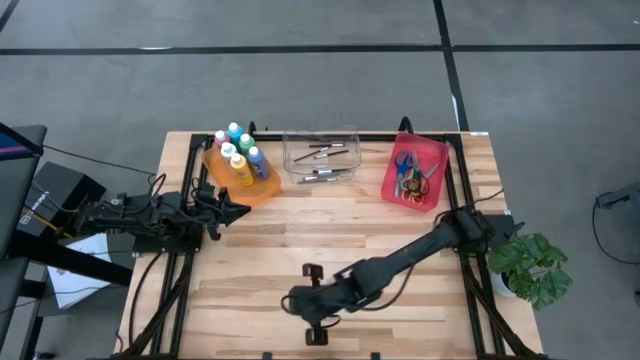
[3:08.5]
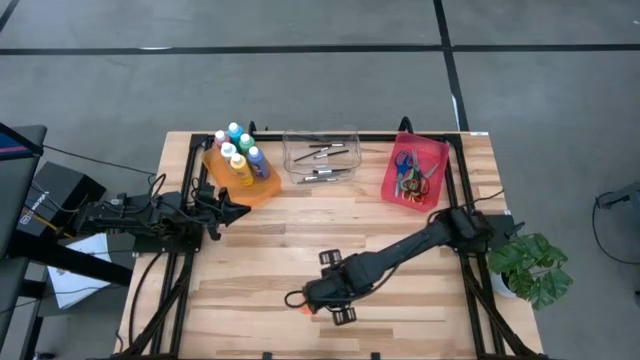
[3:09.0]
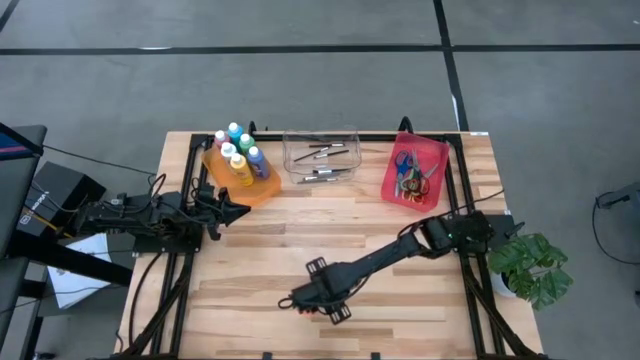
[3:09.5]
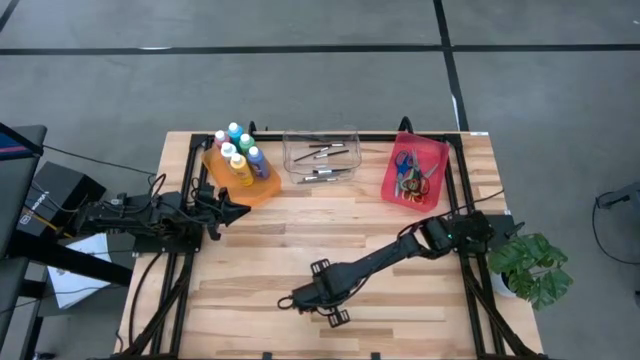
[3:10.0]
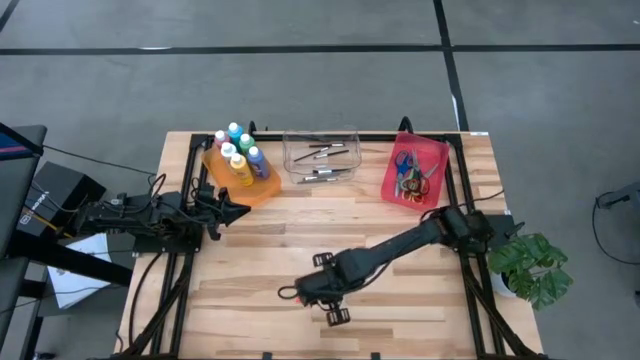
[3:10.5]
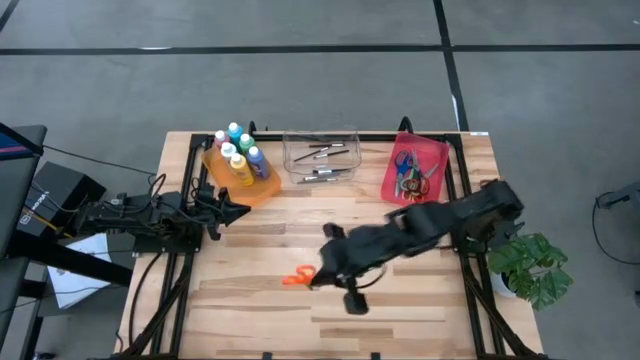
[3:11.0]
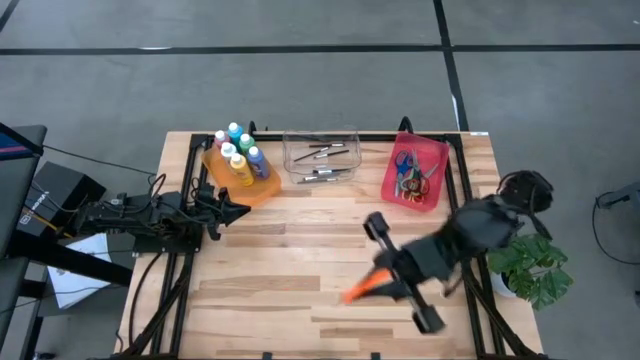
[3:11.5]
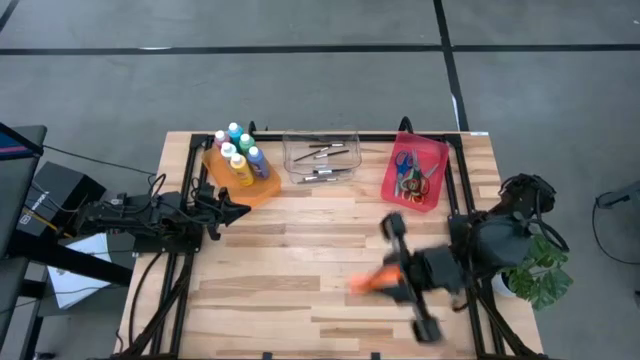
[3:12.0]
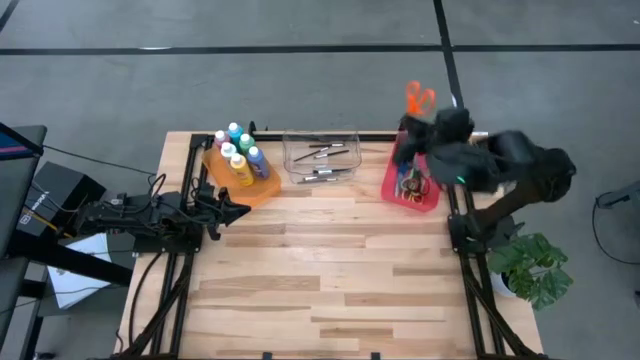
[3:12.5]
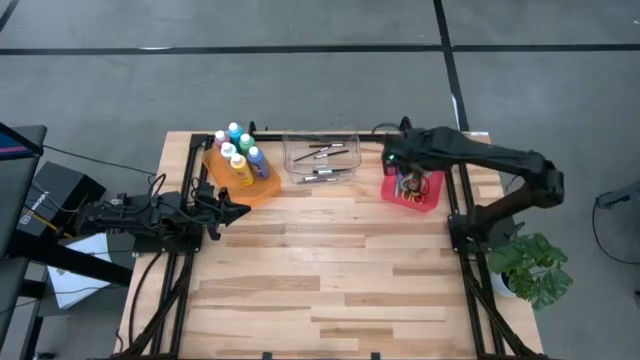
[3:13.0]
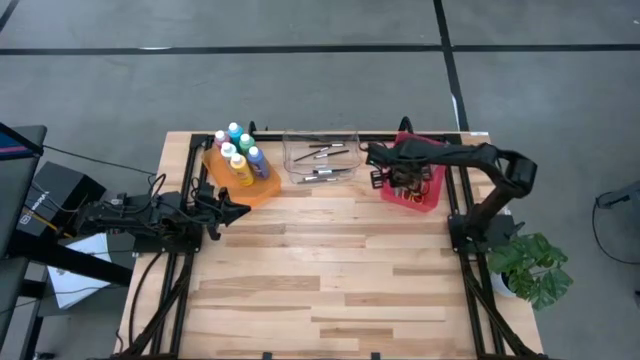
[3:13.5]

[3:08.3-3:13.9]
Task: Pick & Place Paint Supplies
Put the orange scissor into the red bin

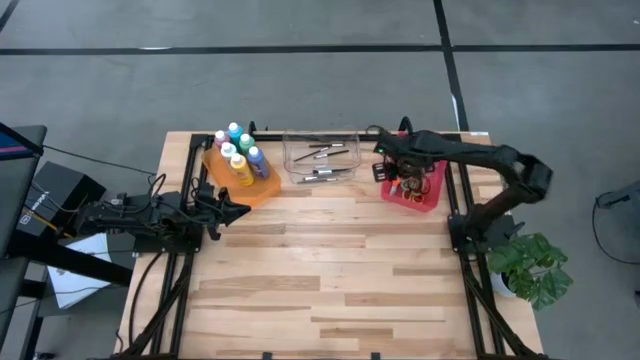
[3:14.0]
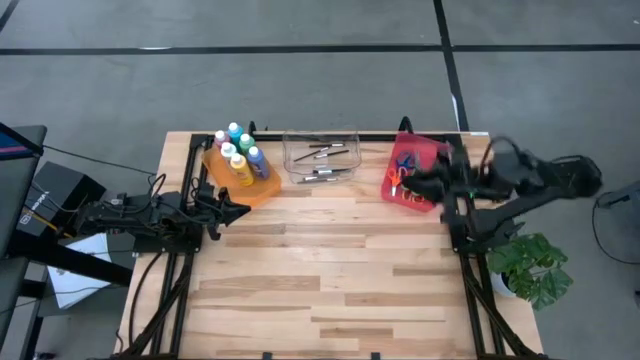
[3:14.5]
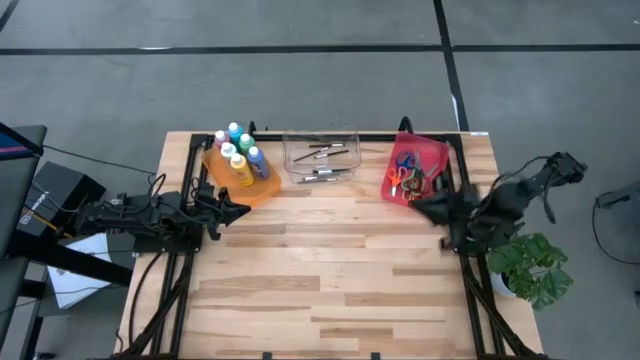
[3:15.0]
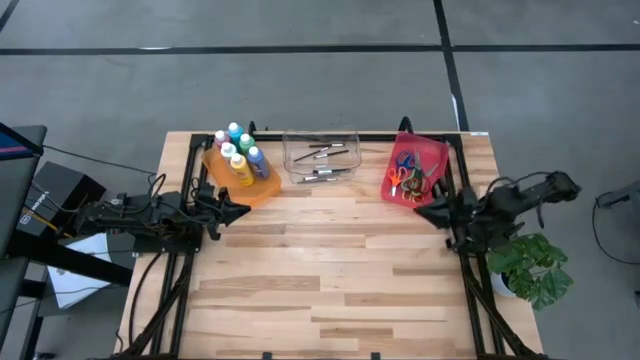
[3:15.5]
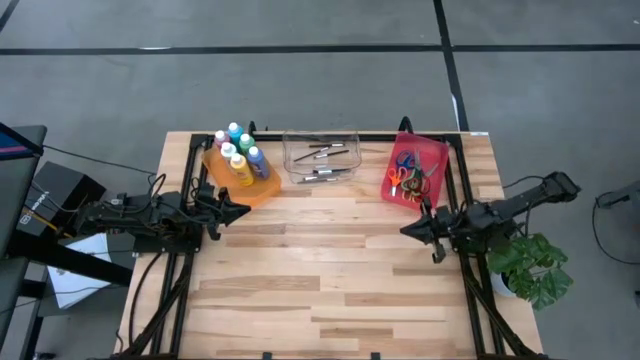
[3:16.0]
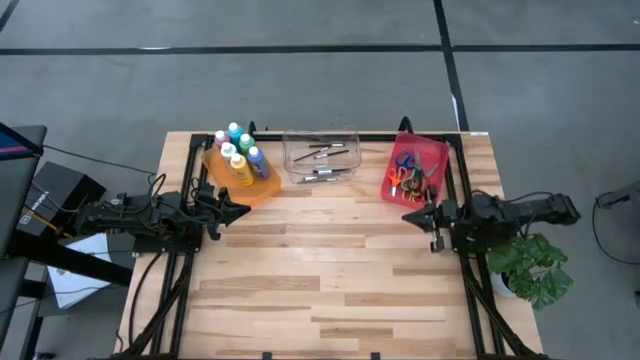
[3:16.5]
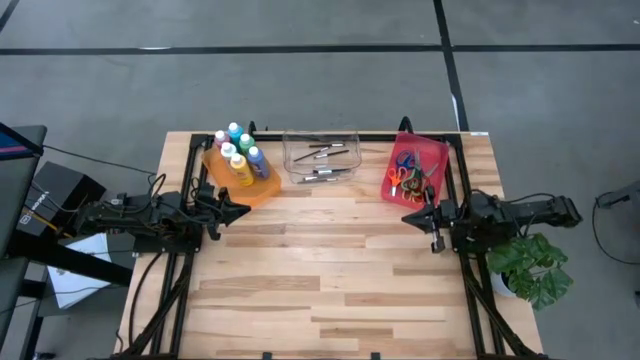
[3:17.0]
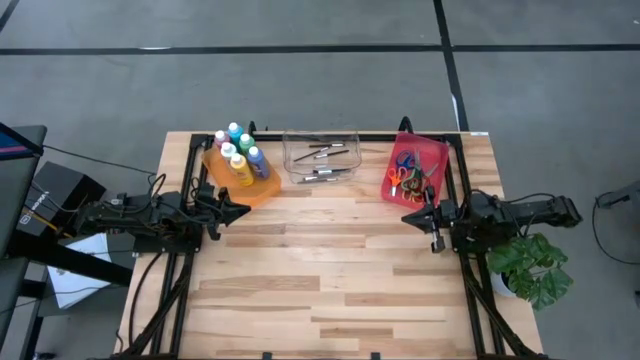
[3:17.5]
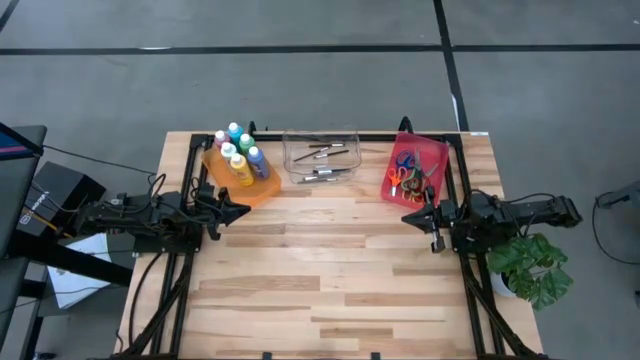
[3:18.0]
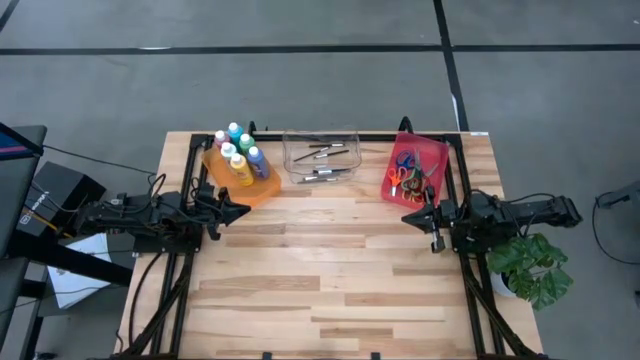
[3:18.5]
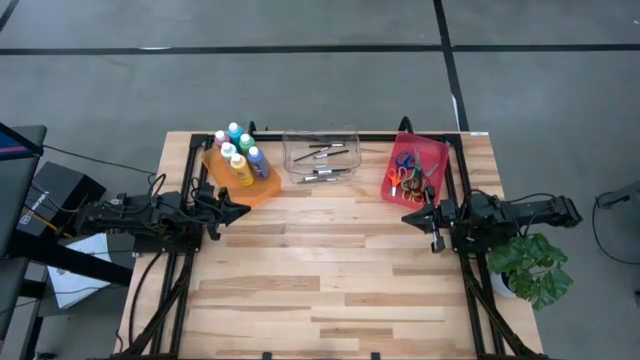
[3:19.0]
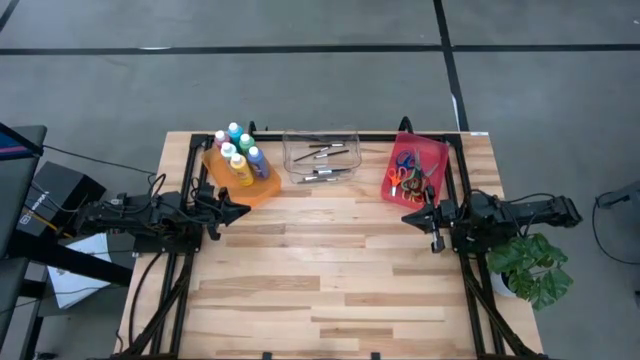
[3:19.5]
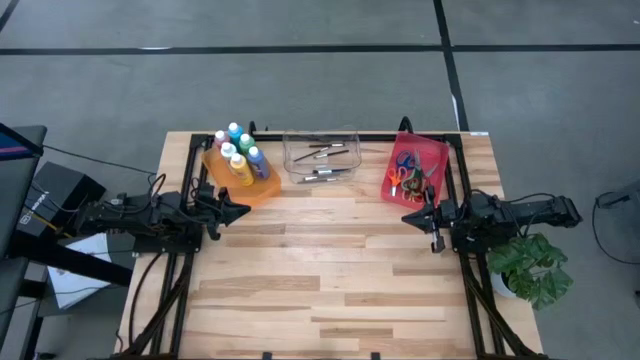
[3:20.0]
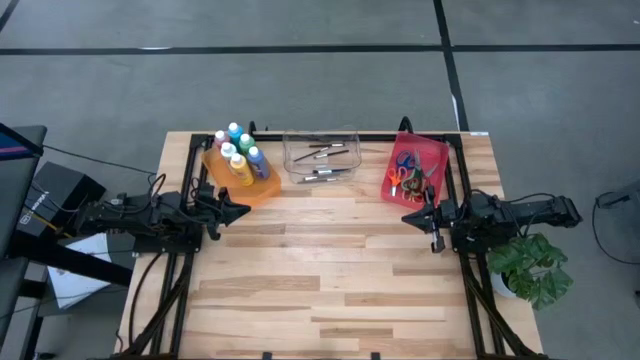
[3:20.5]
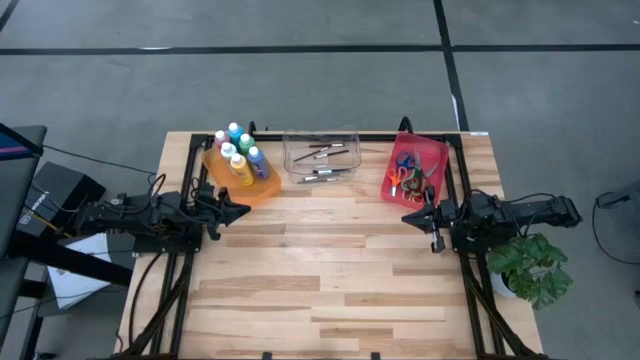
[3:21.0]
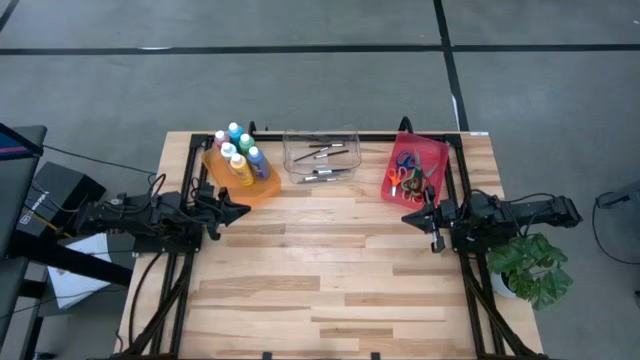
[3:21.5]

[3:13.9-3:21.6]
Return to home position

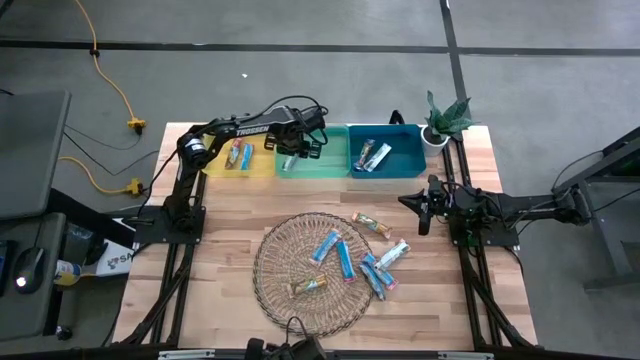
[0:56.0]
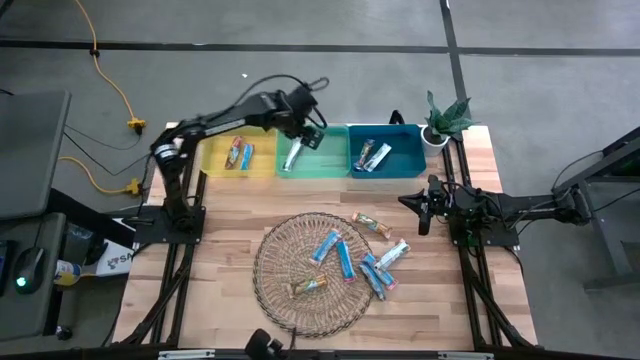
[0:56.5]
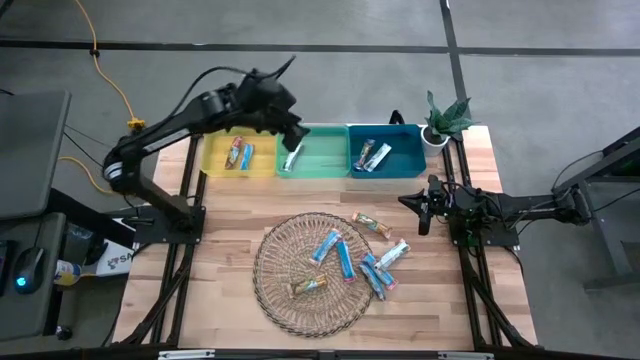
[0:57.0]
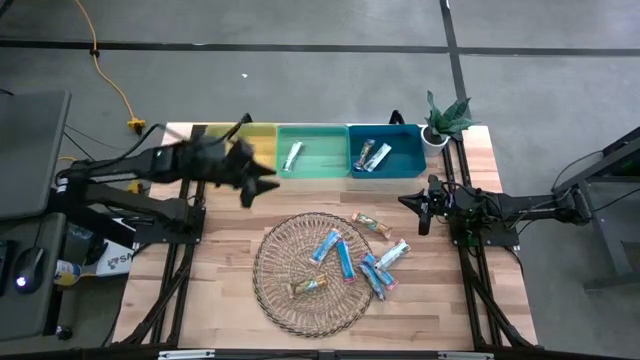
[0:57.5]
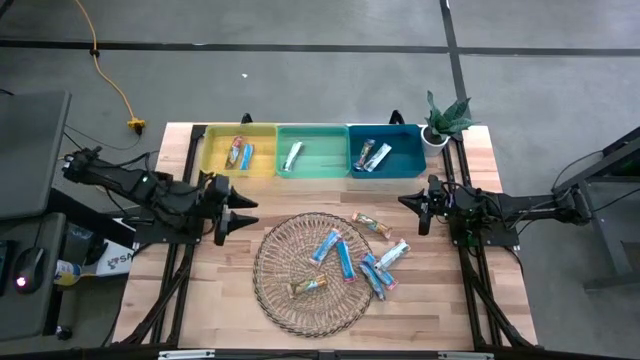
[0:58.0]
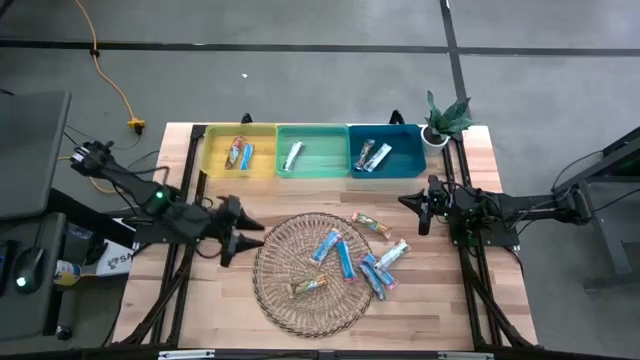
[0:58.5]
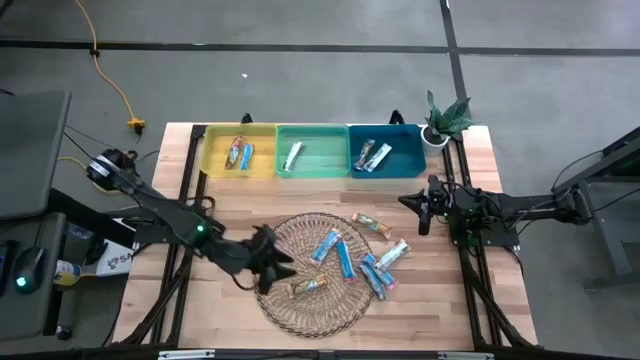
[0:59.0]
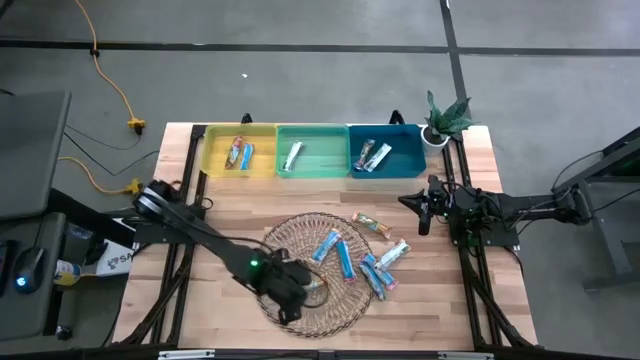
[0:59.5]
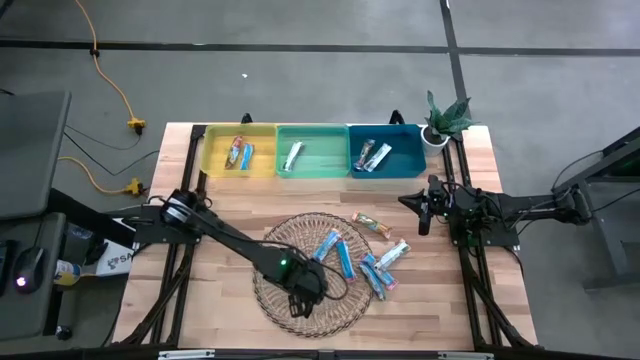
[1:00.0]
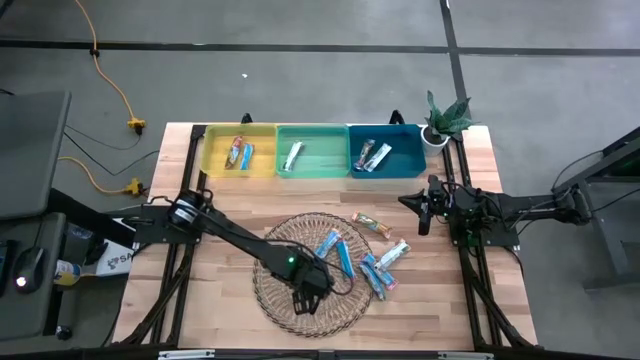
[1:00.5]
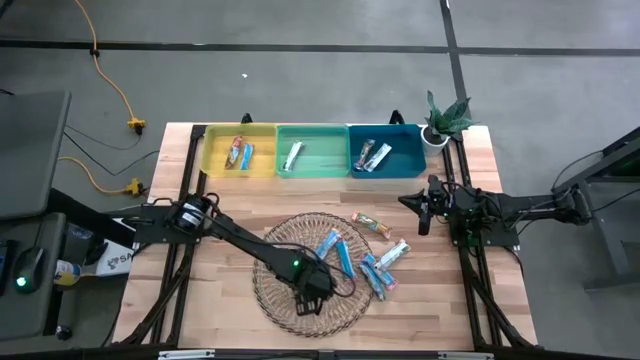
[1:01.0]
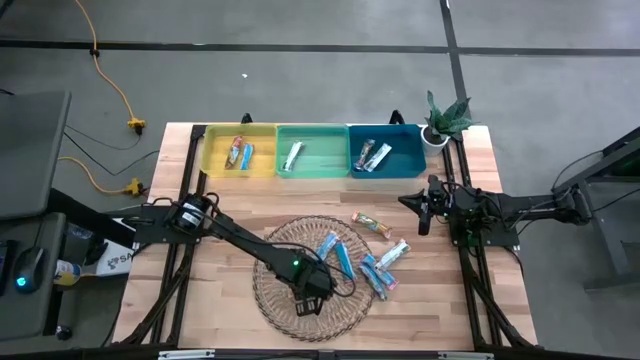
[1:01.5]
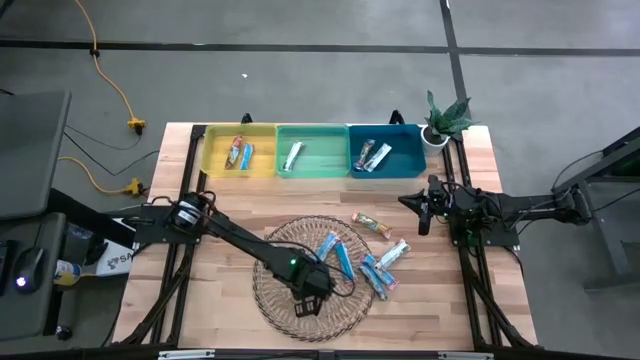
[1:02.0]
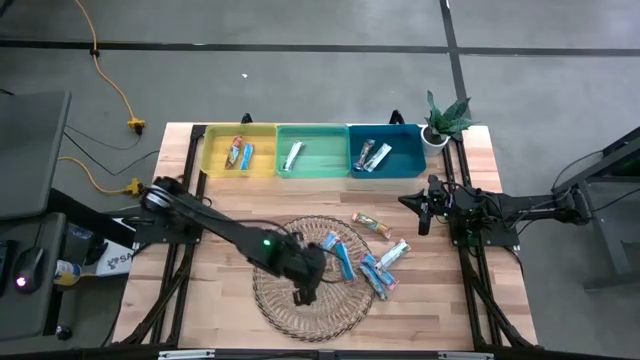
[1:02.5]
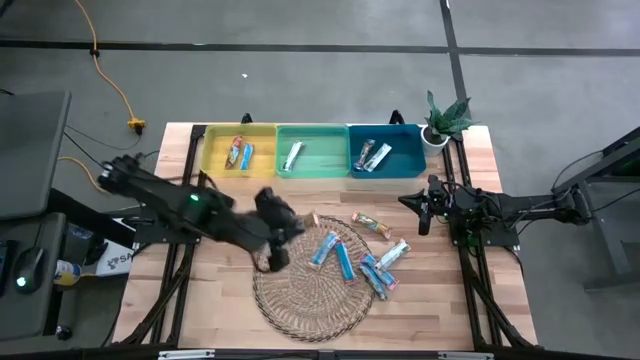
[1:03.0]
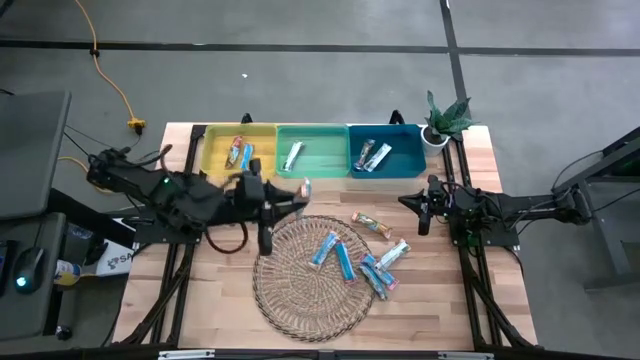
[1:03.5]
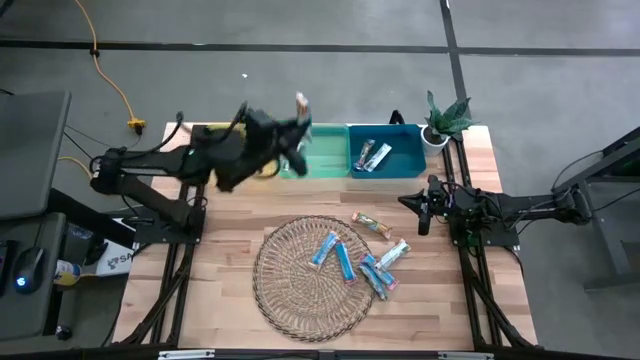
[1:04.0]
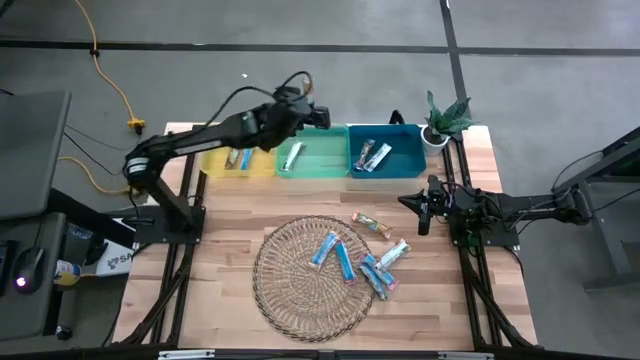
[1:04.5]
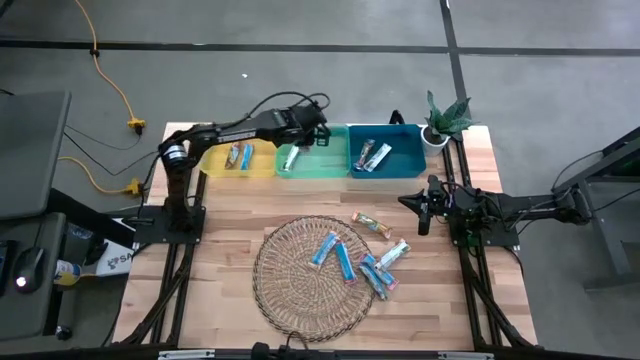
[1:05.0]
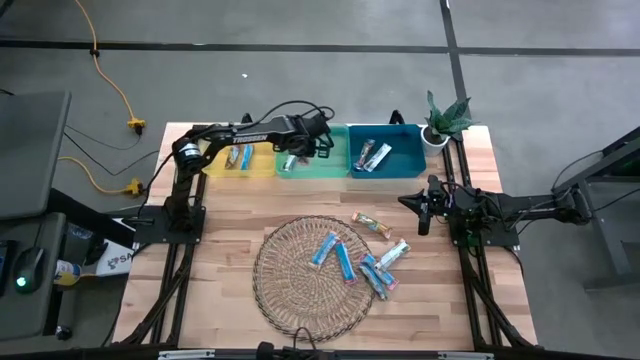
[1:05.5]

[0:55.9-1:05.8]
Task: Pick and place Granola Bars by type
Put the yellow granola bar into the green bin
